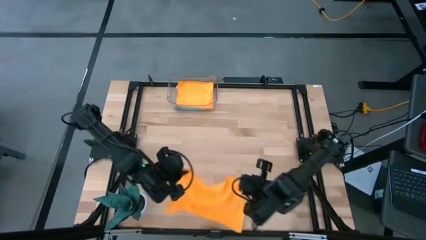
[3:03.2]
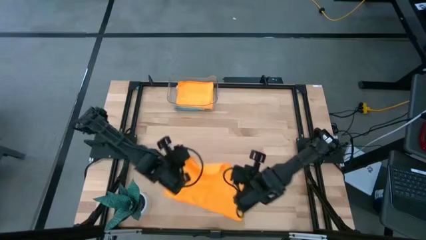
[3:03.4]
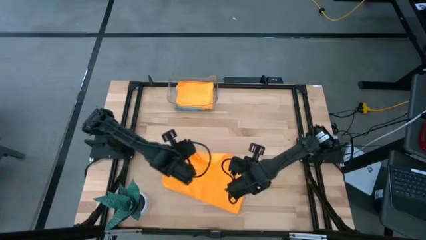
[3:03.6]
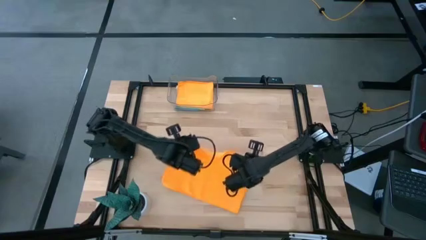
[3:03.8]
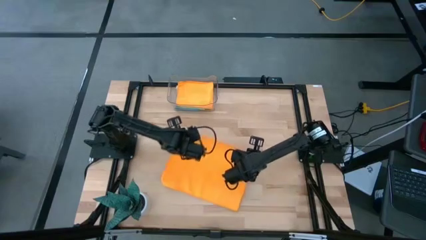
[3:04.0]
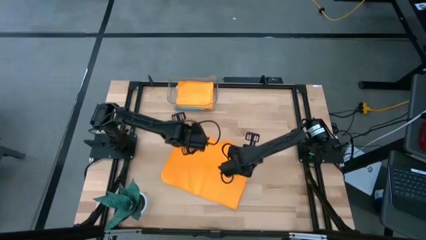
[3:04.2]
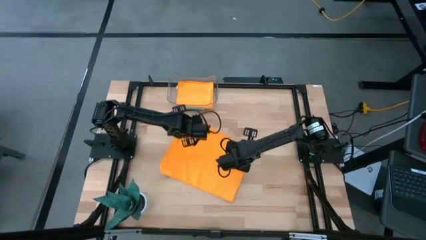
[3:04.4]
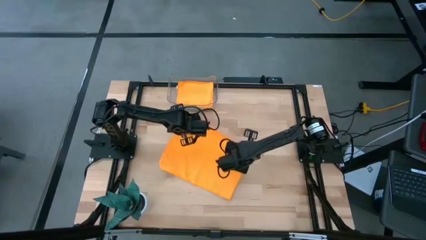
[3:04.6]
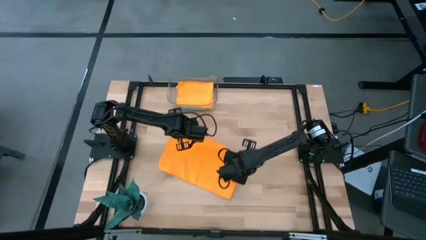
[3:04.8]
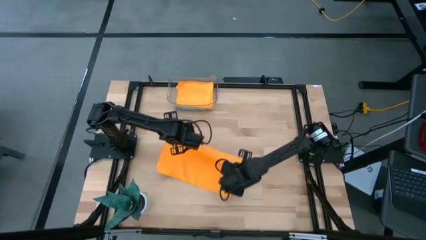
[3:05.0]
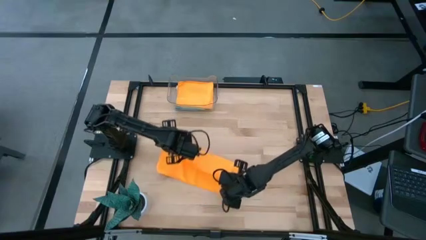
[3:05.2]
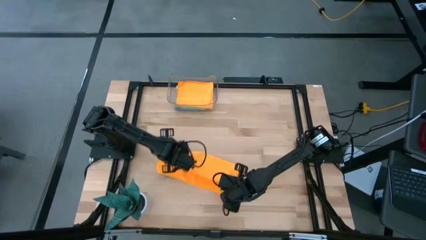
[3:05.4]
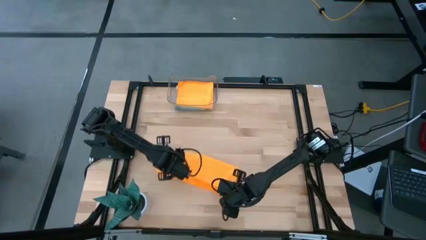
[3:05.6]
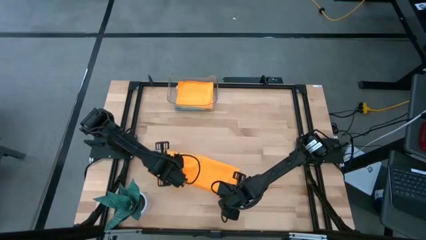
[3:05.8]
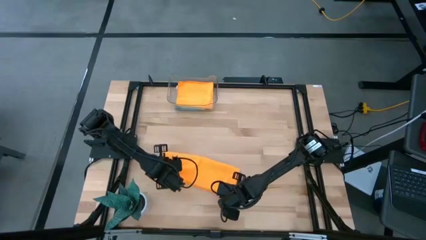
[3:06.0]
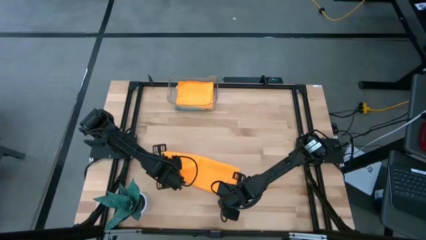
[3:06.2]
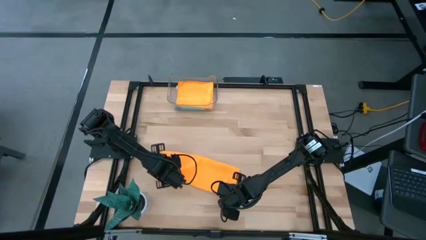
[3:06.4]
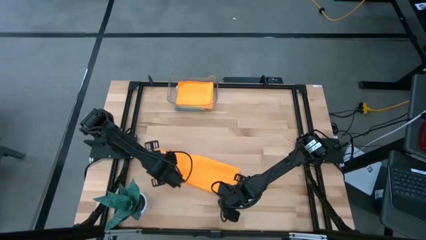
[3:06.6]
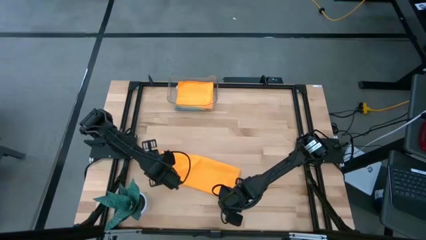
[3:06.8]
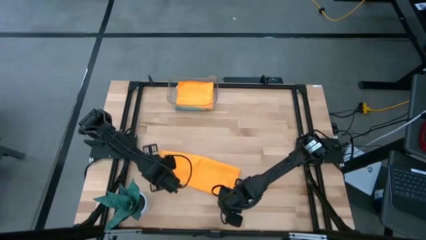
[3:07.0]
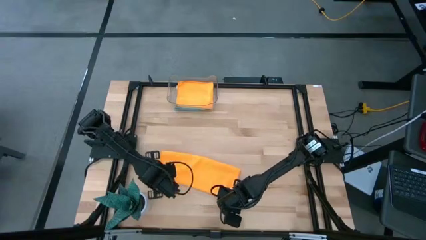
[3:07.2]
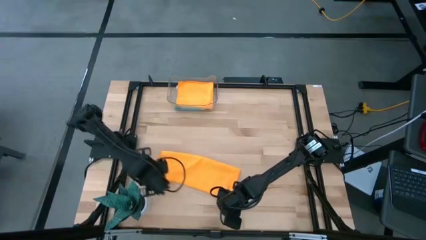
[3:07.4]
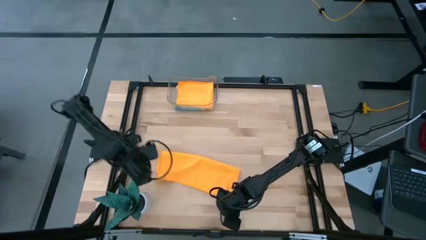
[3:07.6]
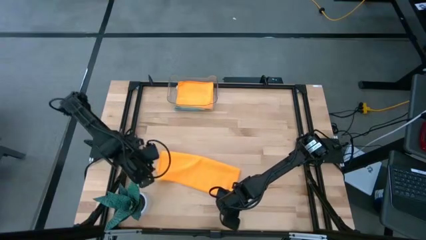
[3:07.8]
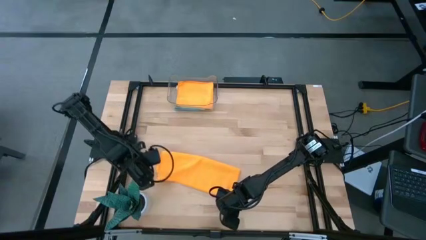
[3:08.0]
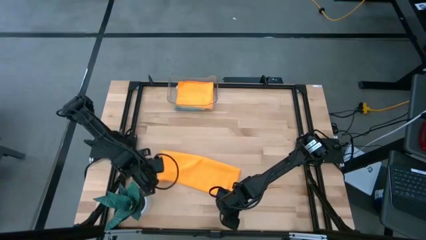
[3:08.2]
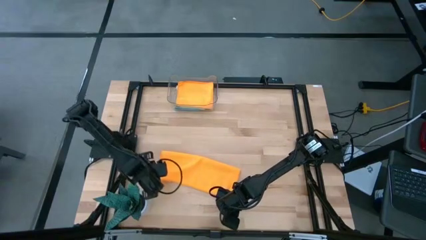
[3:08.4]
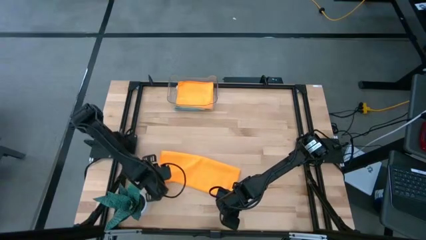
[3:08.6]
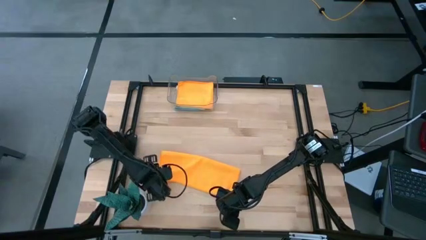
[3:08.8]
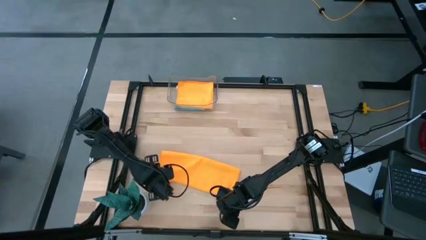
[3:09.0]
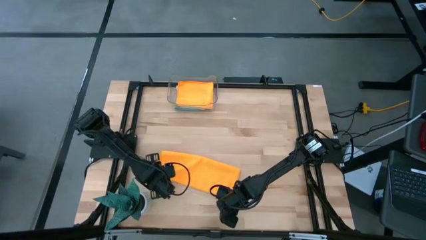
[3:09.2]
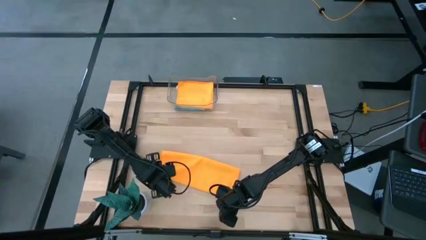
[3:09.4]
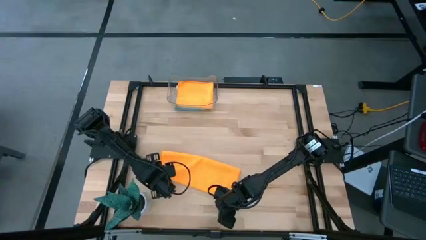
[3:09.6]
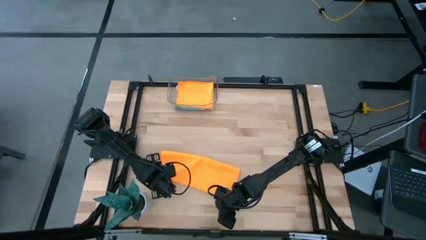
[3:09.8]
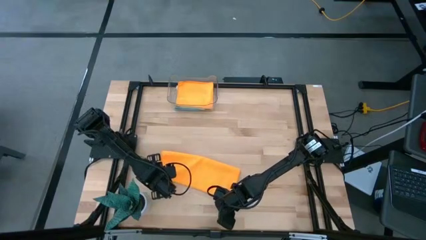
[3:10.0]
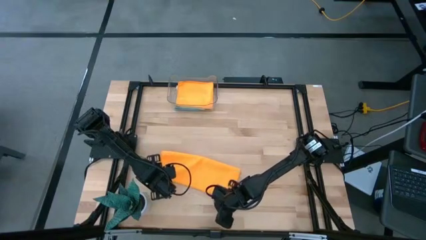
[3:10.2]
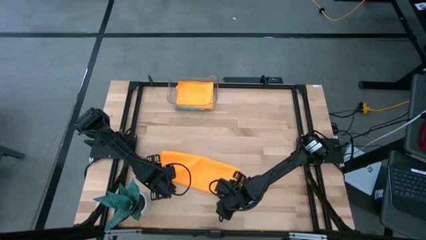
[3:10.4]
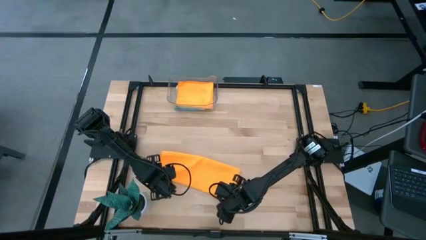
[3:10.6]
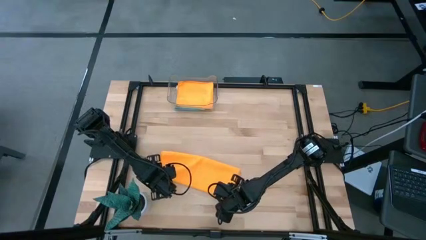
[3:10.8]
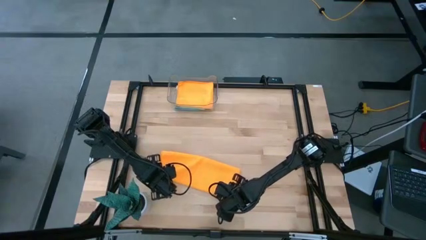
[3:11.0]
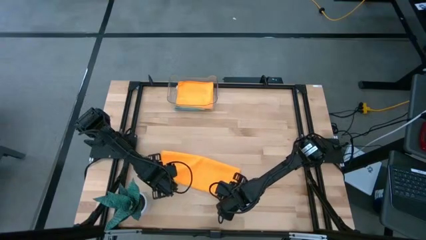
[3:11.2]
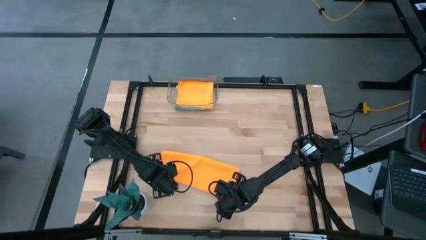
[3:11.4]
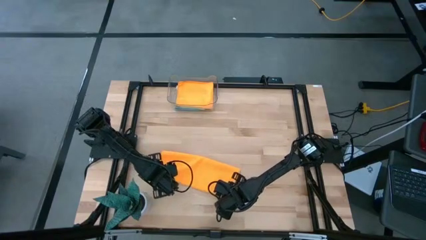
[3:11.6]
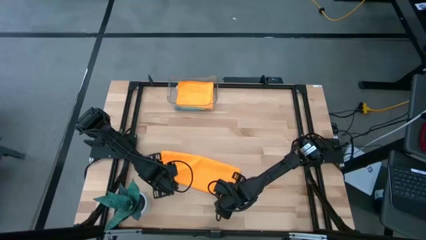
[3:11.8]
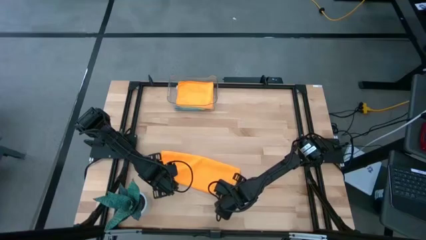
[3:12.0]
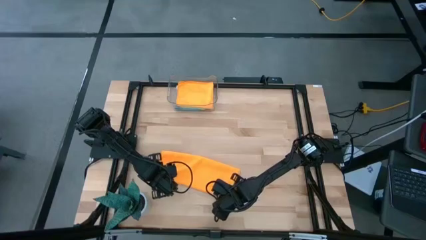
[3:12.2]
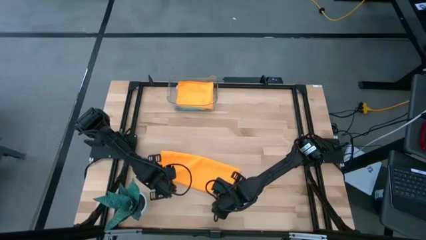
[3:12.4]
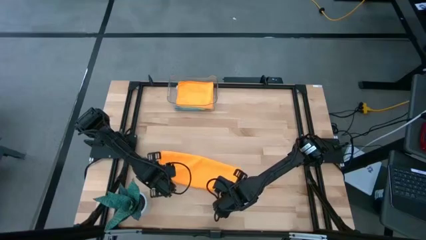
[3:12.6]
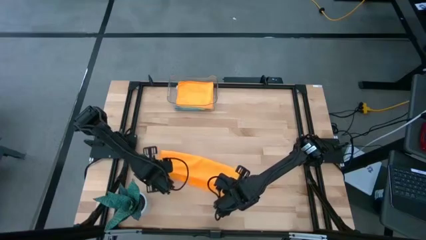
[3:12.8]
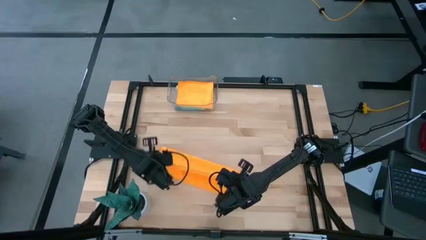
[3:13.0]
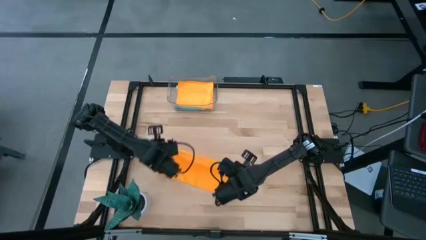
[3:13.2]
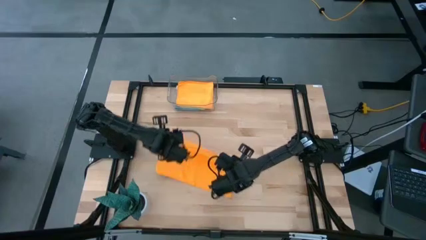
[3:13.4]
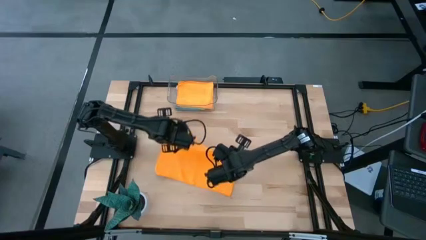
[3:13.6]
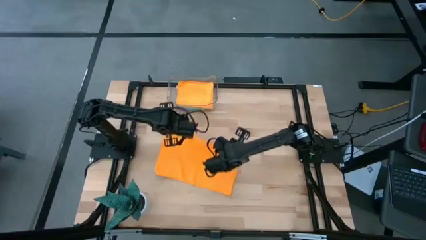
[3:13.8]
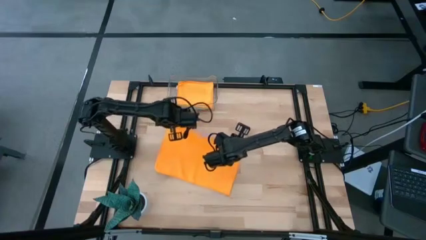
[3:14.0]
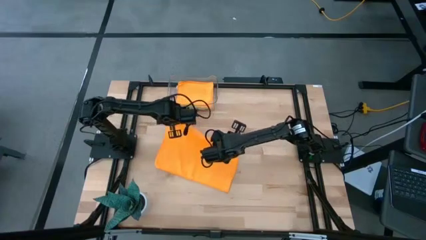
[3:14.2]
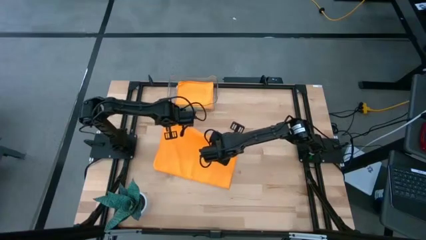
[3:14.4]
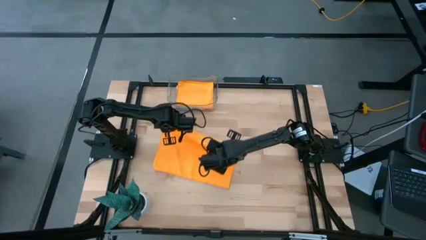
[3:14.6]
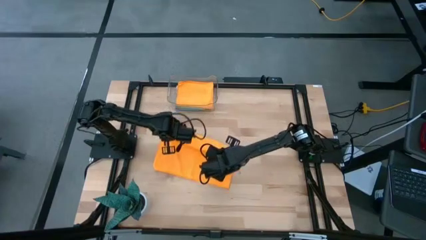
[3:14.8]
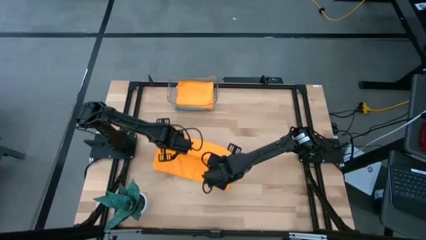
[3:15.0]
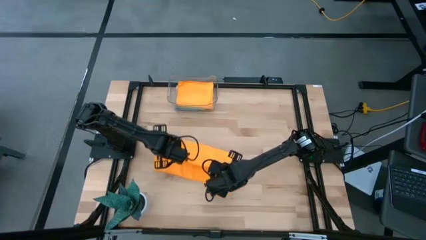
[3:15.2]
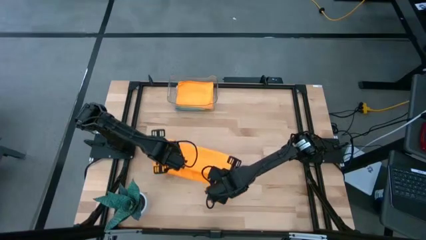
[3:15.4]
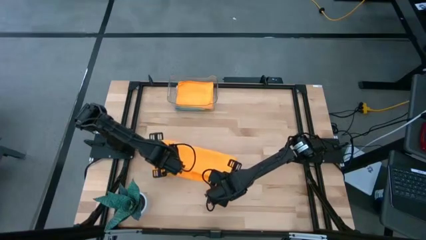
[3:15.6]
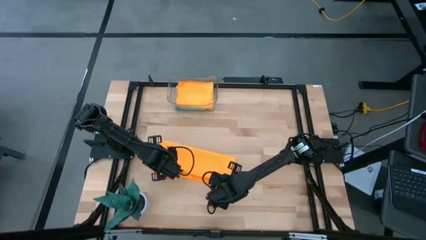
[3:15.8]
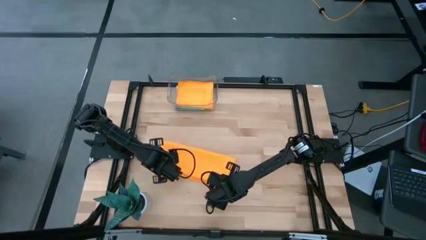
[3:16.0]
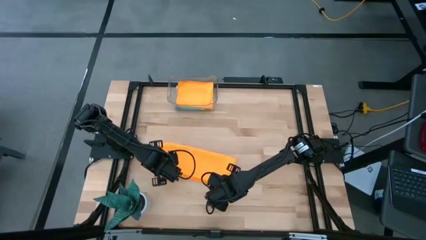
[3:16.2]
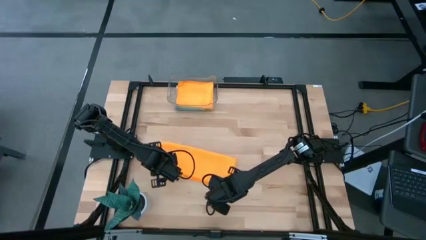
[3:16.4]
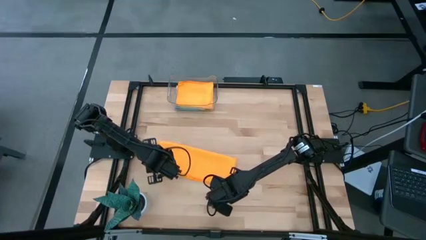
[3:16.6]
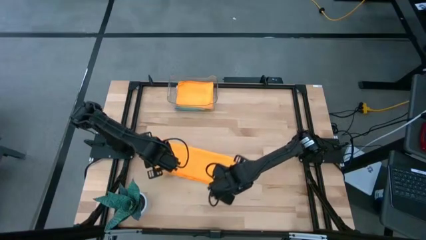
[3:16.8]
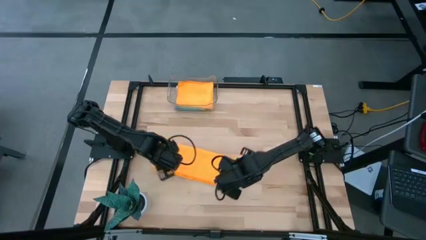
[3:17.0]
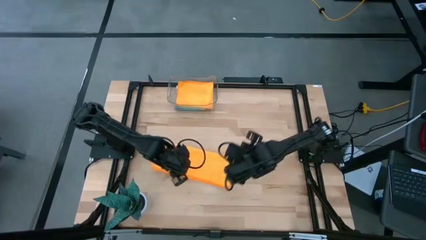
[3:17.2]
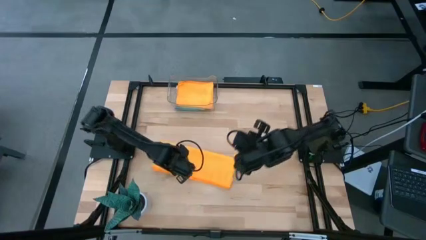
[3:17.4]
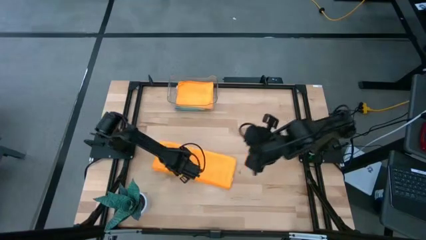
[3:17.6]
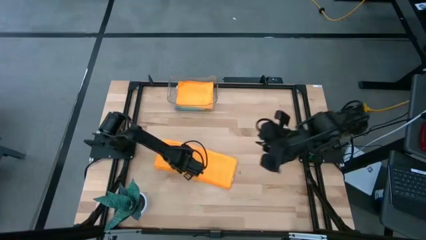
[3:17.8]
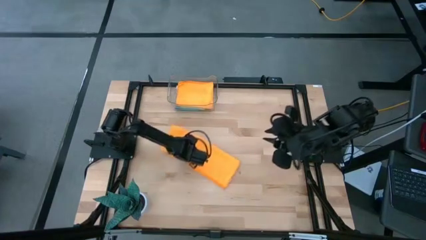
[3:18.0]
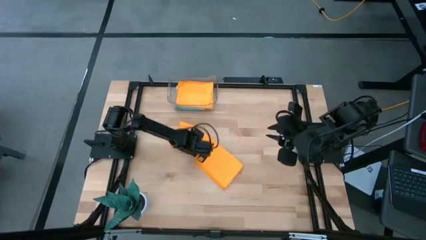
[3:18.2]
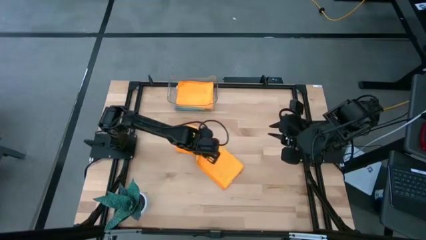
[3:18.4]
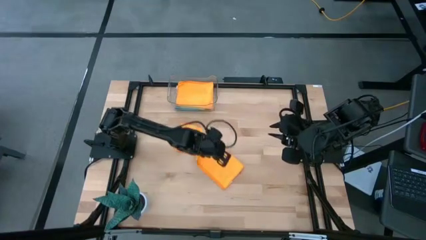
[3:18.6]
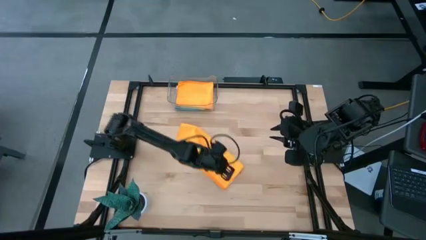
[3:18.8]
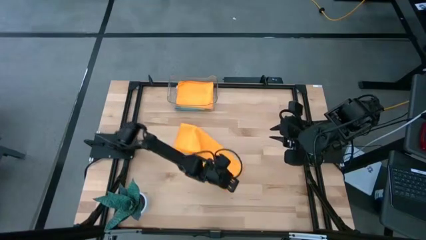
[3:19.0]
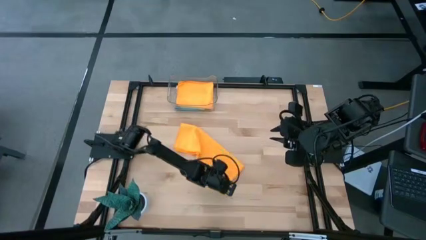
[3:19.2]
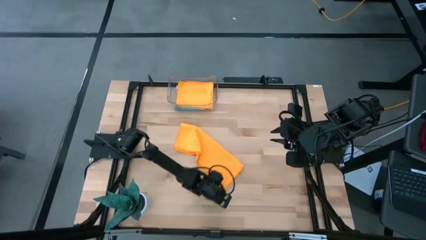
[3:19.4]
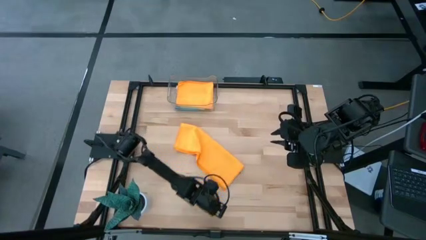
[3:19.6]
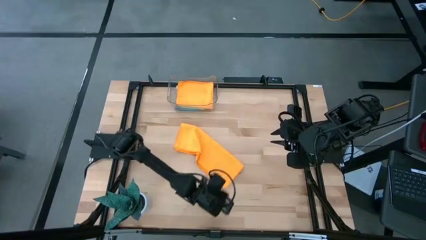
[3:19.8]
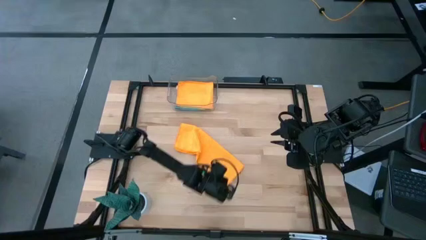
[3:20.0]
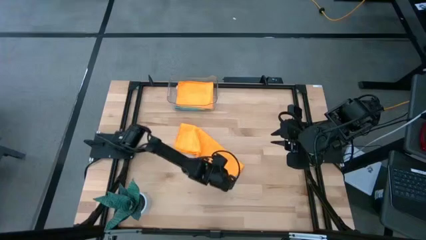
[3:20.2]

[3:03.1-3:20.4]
Task: Fold microfiber towels
Fold the orange microfiber cloth
